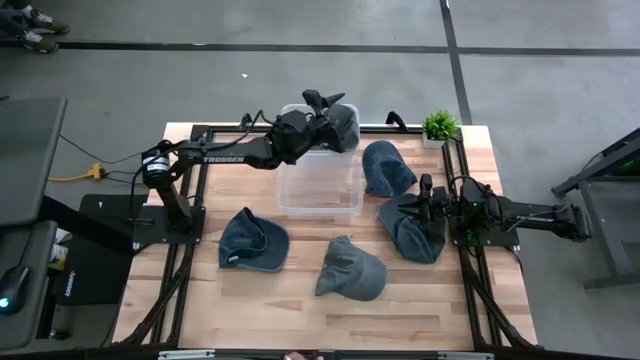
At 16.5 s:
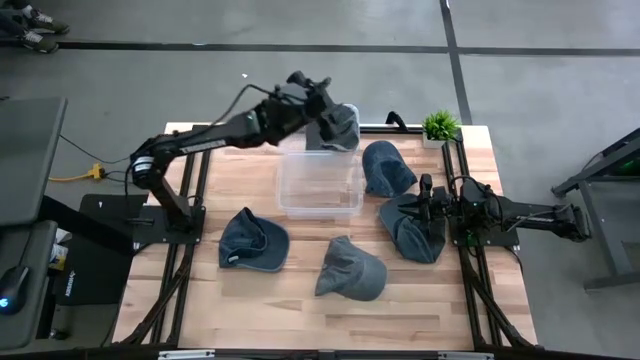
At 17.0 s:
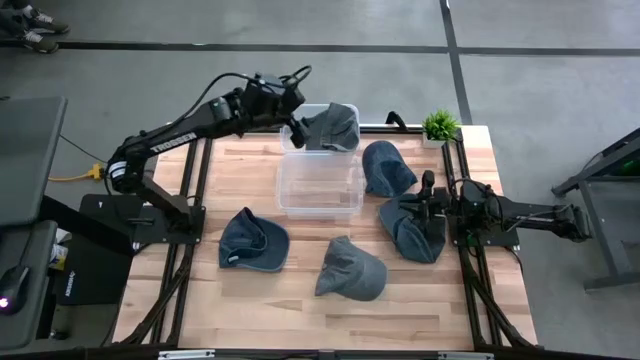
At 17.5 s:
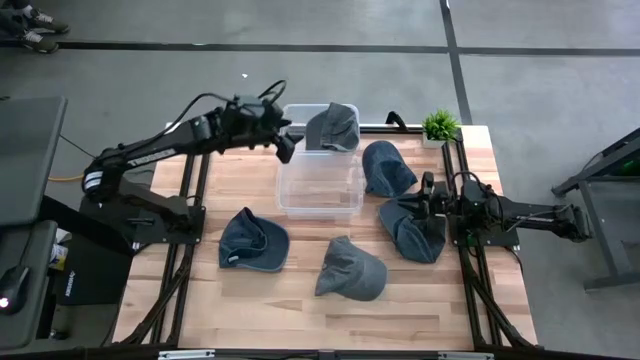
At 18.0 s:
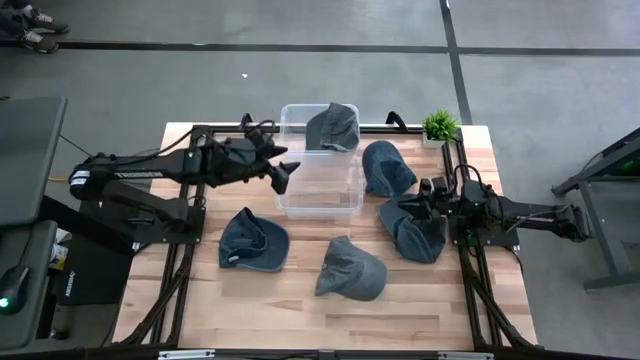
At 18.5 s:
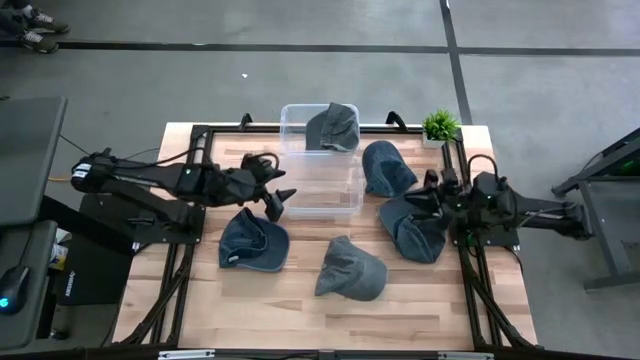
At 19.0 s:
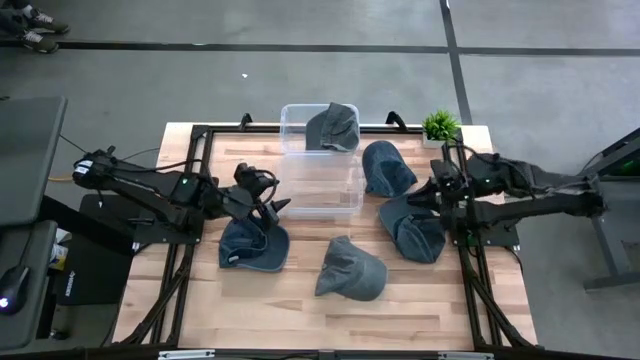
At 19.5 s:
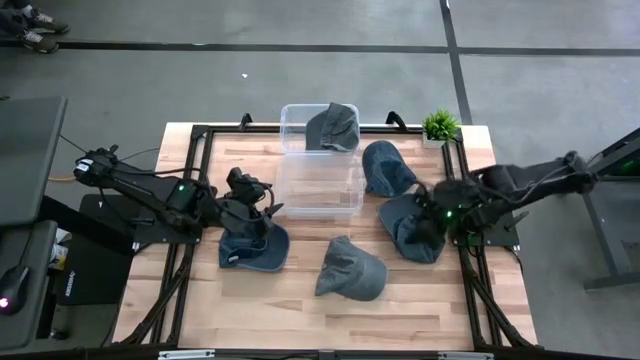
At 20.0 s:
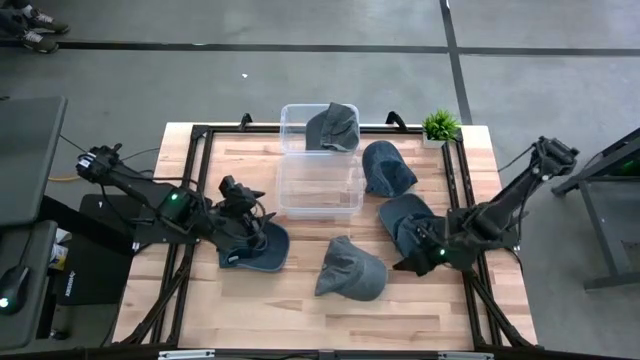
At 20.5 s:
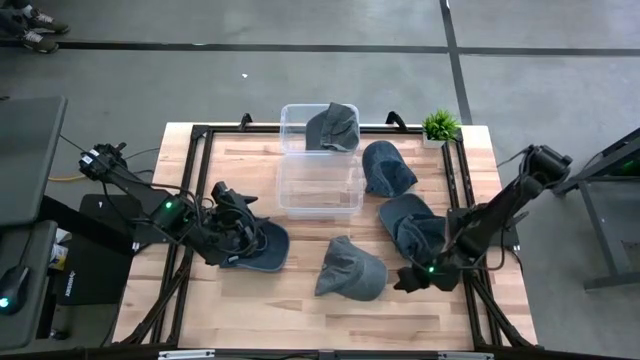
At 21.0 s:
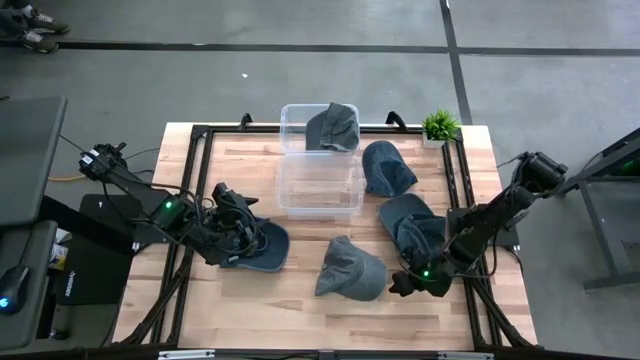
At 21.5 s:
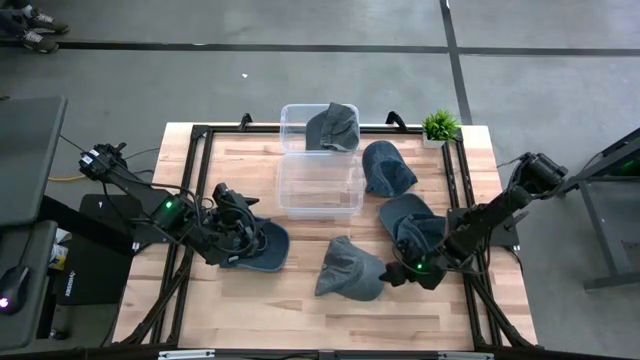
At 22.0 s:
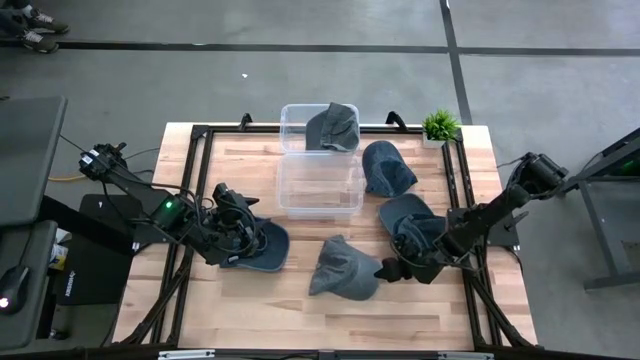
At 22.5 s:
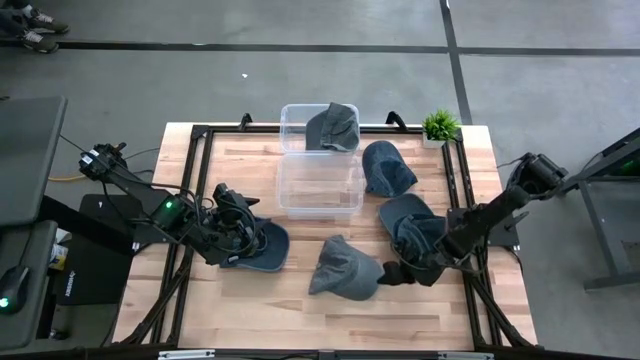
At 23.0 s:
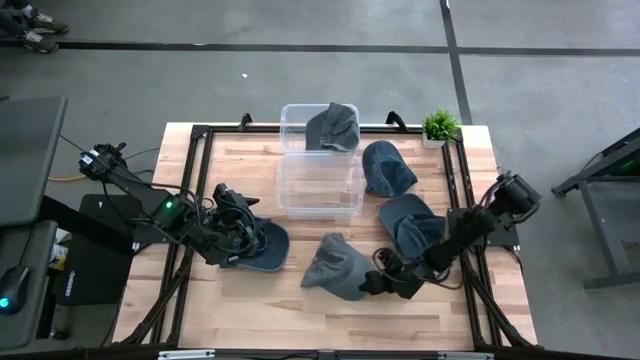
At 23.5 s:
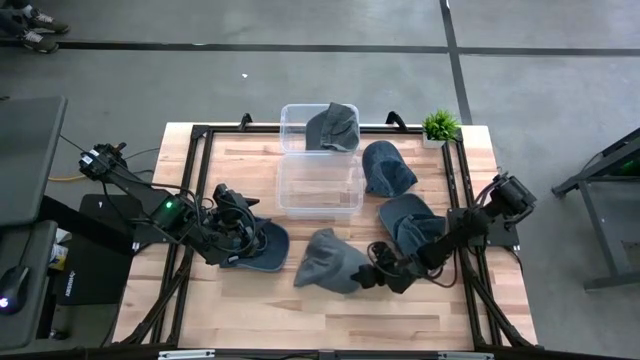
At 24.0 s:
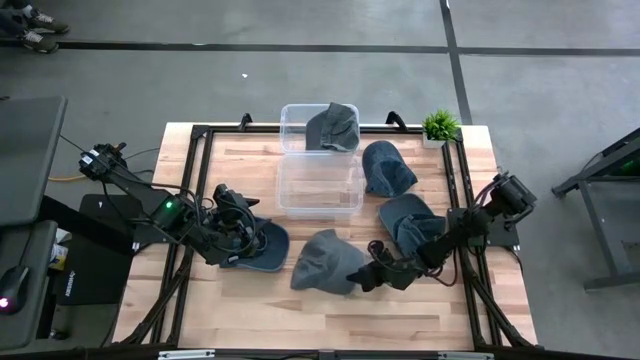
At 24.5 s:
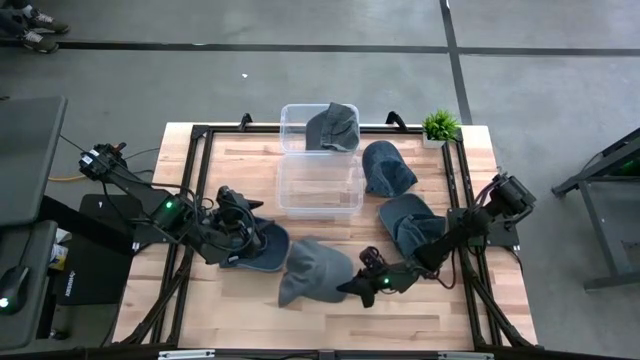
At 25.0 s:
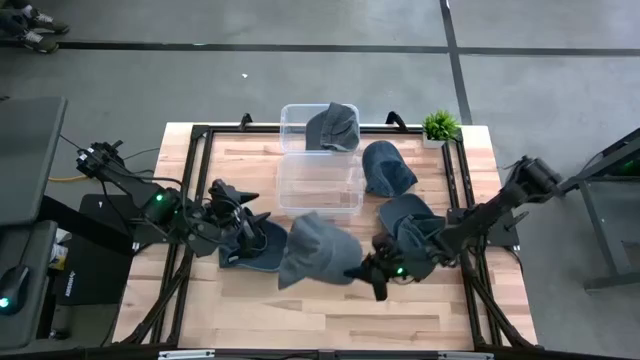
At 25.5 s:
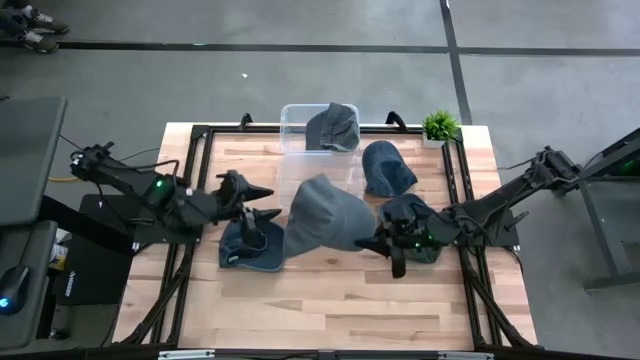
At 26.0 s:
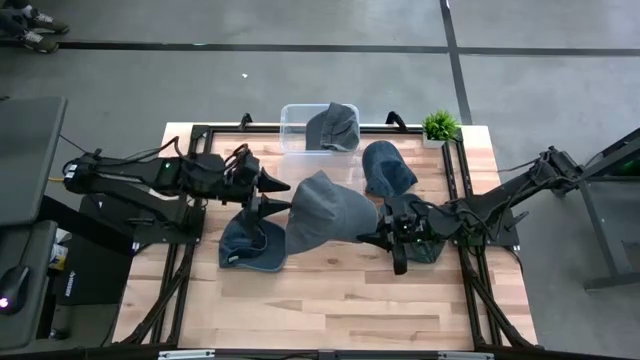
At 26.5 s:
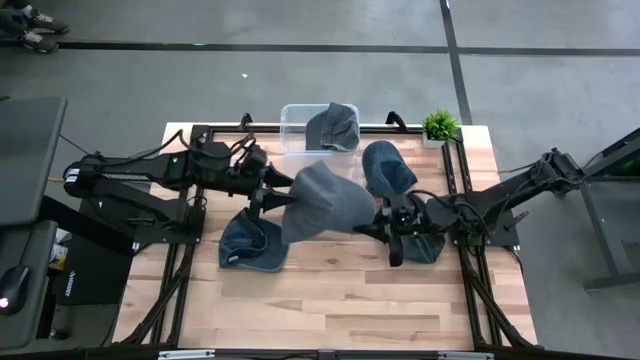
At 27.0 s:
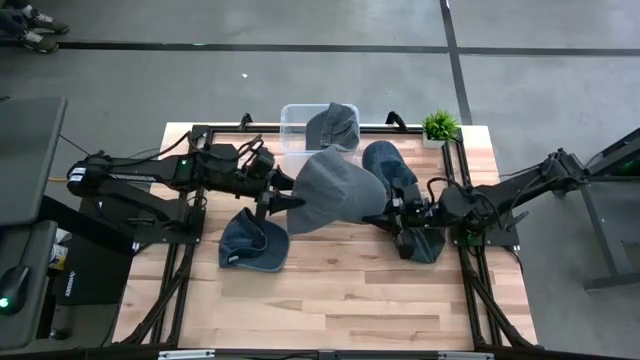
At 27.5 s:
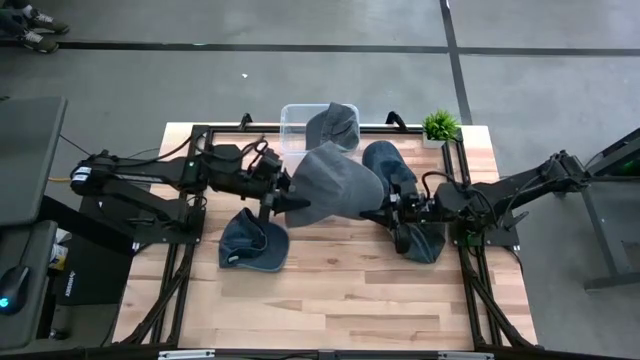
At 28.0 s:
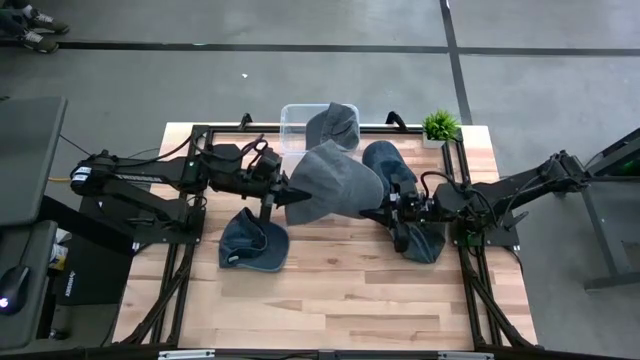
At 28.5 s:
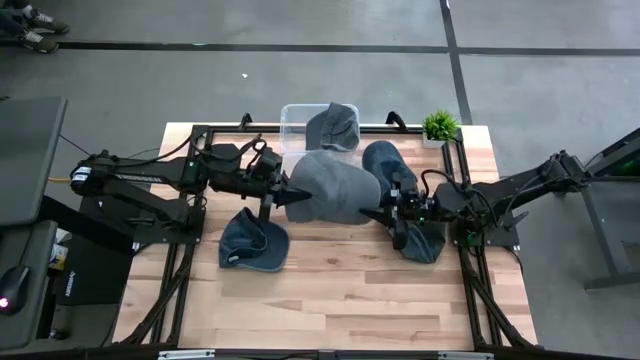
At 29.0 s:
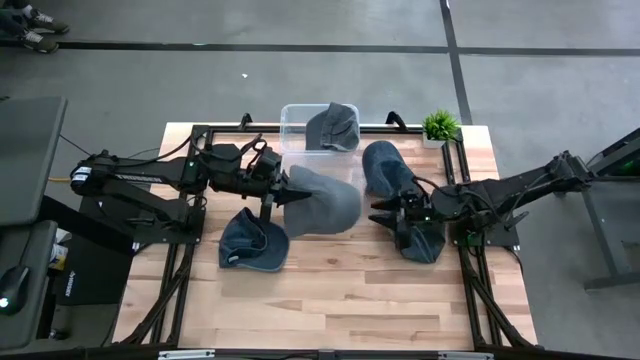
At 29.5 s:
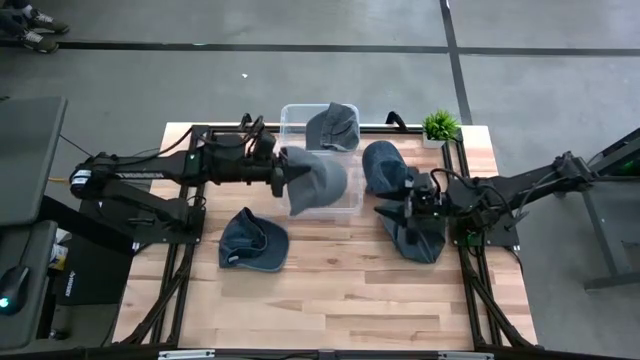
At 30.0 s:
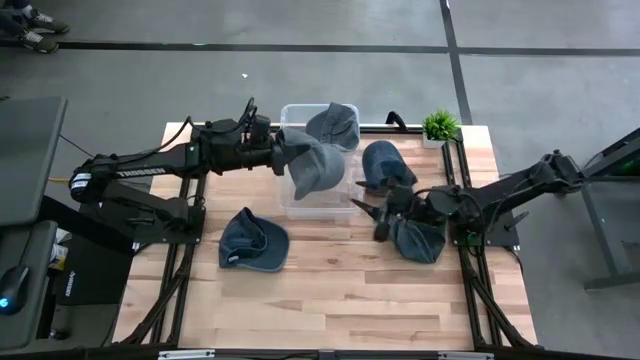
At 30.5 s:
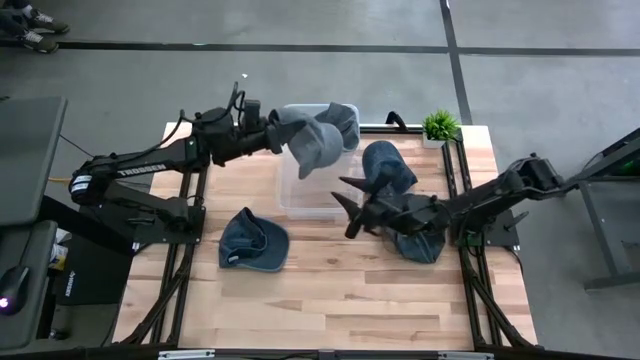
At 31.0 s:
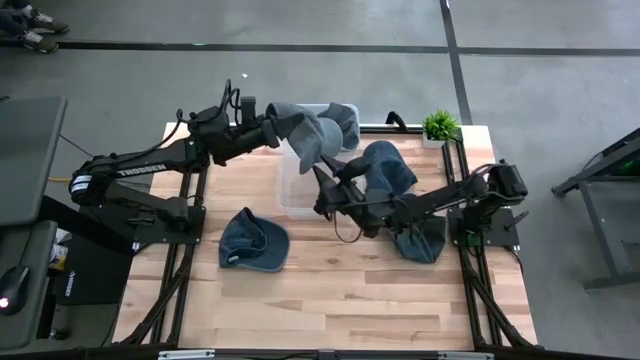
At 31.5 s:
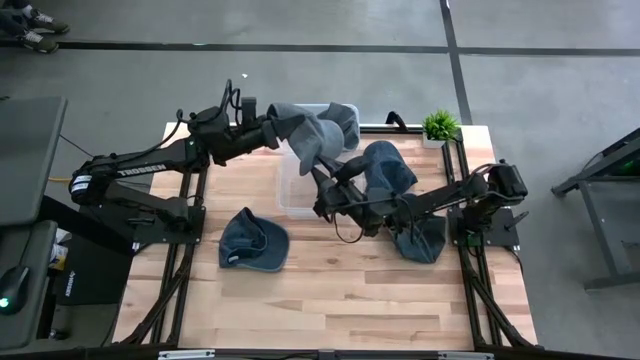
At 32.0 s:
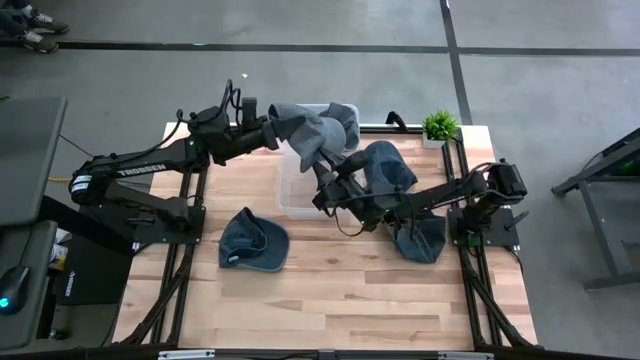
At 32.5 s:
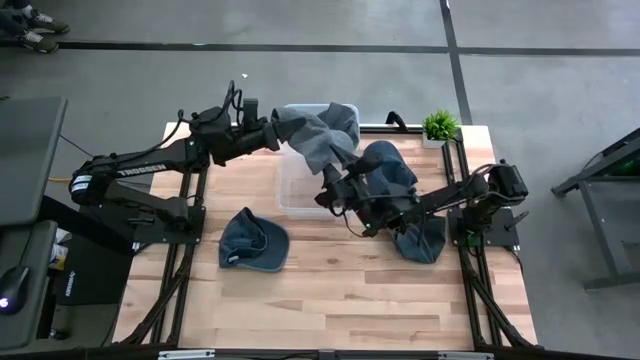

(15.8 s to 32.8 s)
Task: Pick & Place hat
Put the gray cap into the top transparent bin

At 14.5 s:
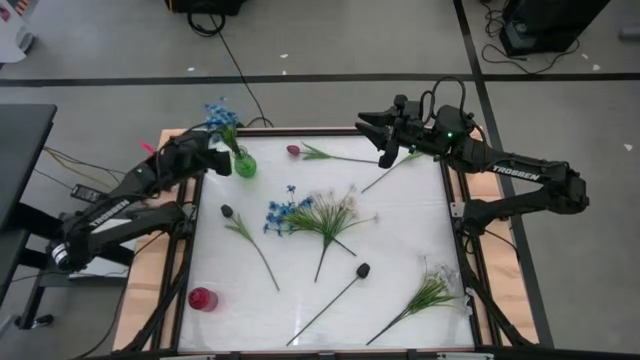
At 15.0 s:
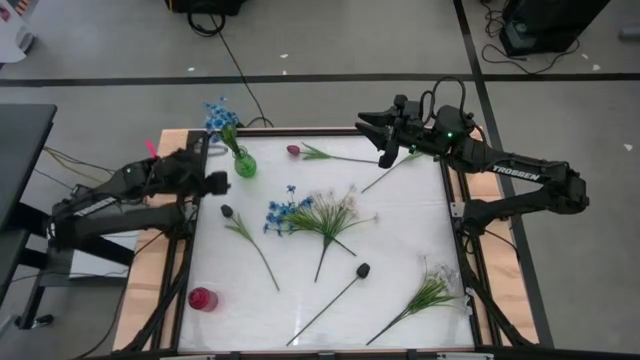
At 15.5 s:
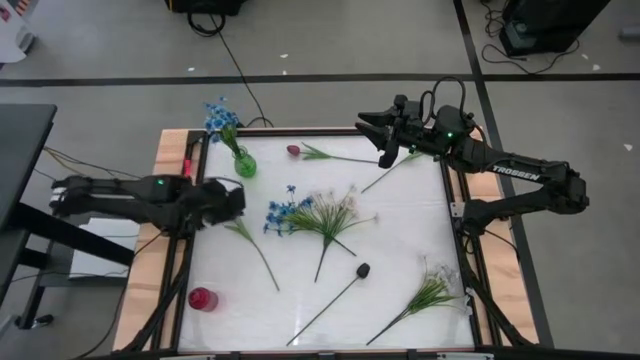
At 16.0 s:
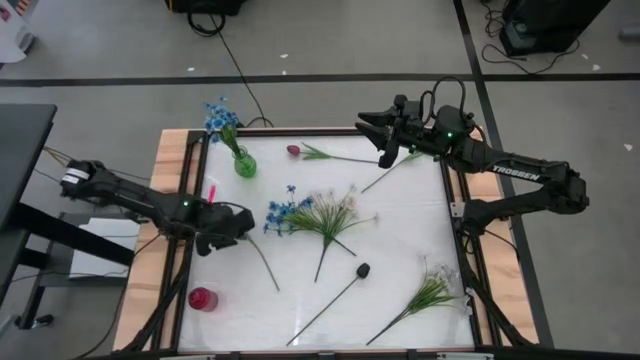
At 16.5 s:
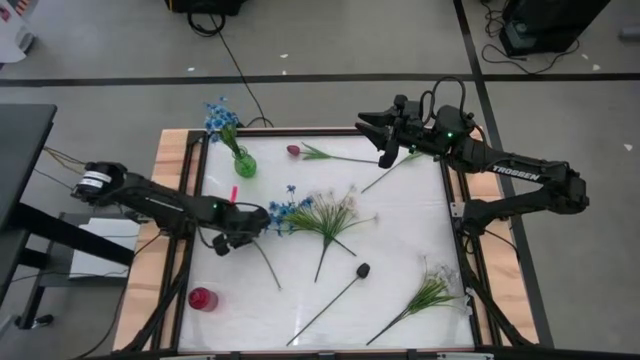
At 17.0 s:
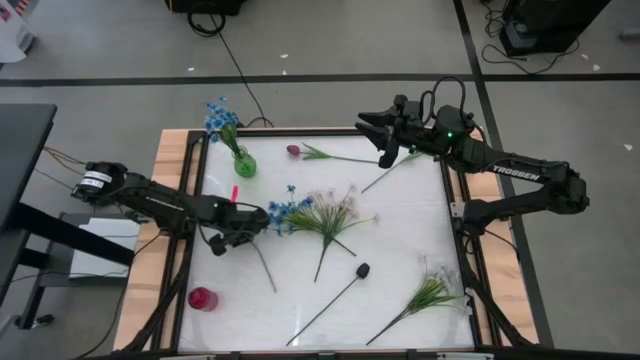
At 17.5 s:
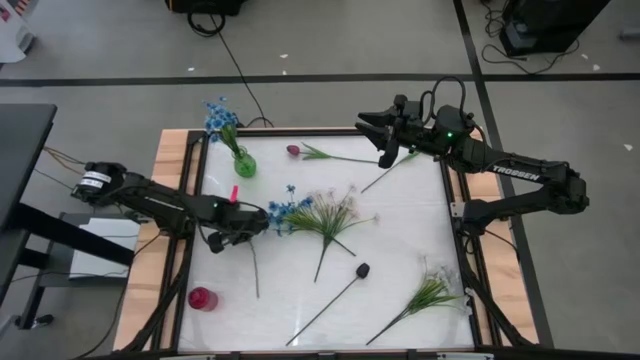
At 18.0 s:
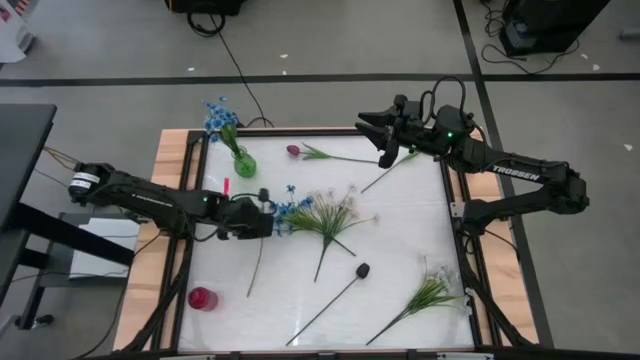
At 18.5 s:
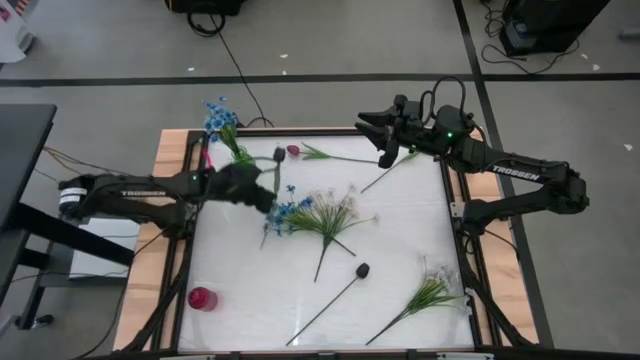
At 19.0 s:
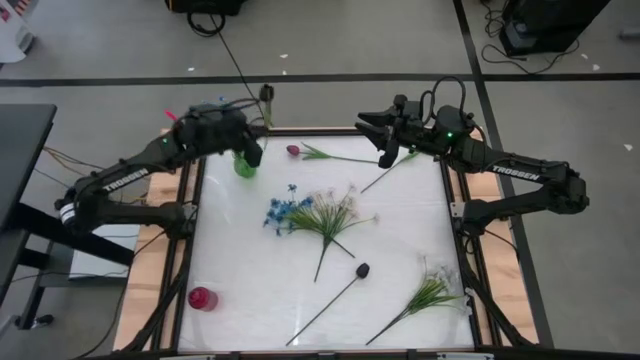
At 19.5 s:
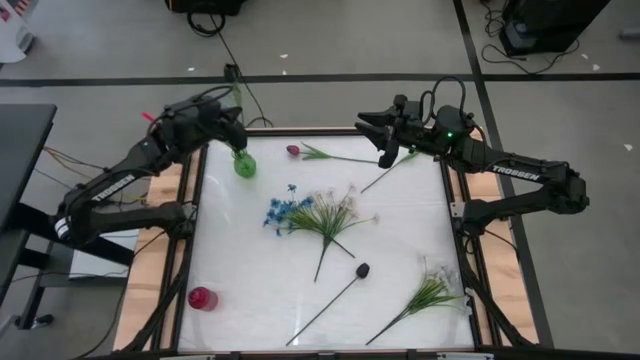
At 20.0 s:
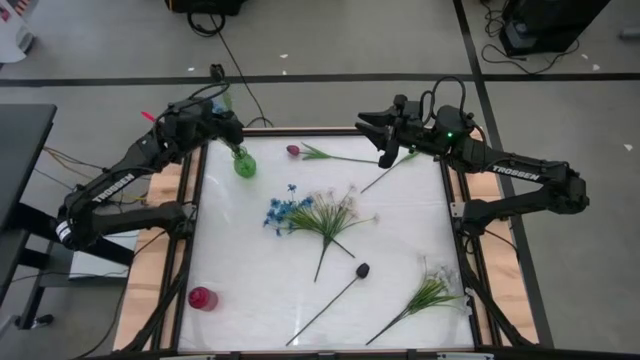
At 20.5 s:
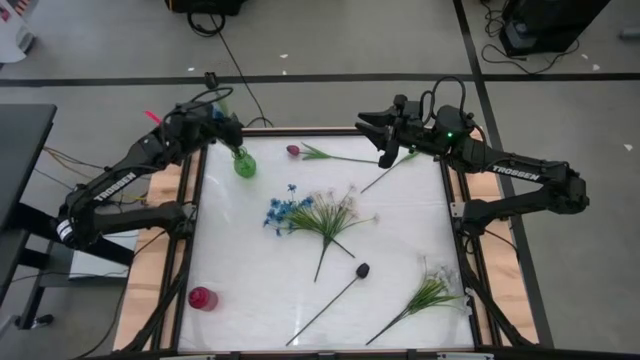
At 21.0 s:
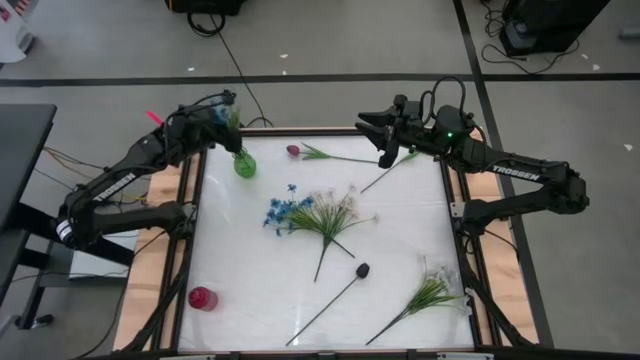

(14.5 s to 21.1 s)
Task: Sort flowers into vase by color
Put the top black tulip into the green vase
